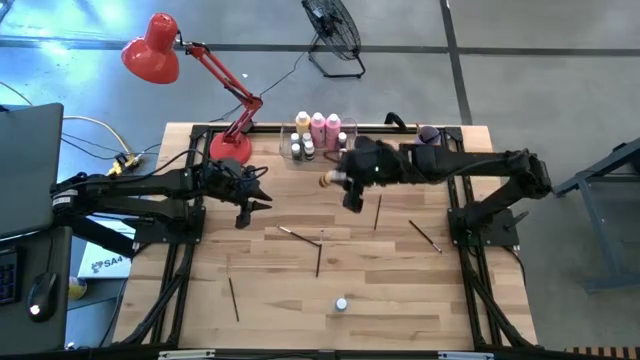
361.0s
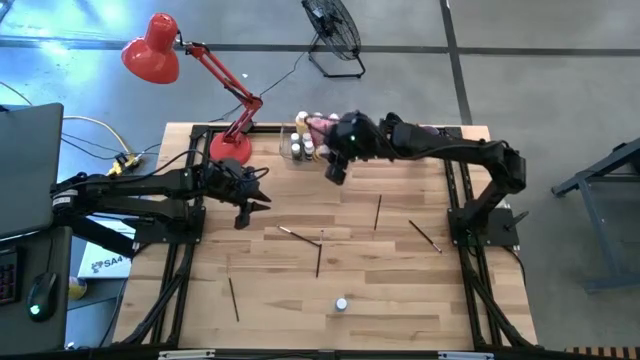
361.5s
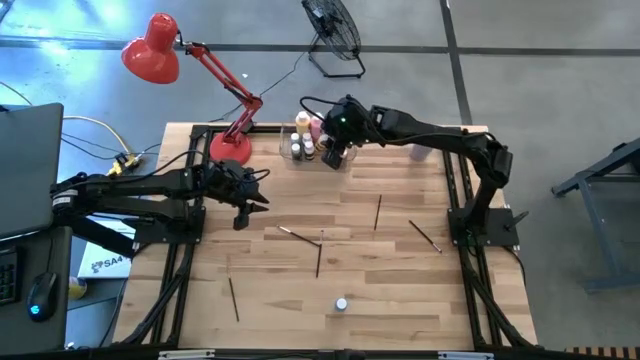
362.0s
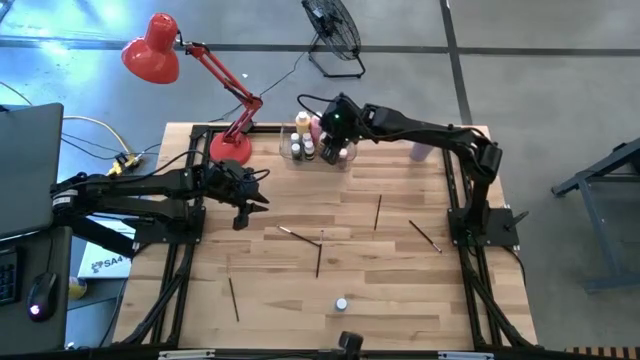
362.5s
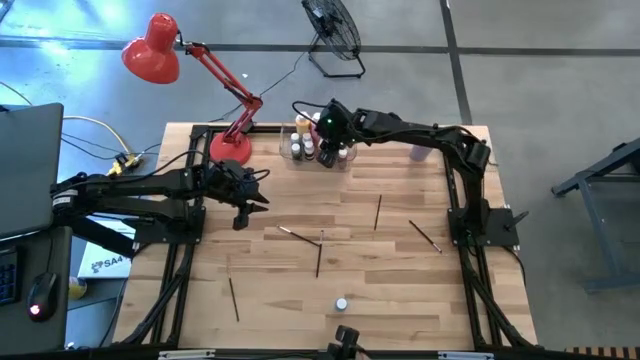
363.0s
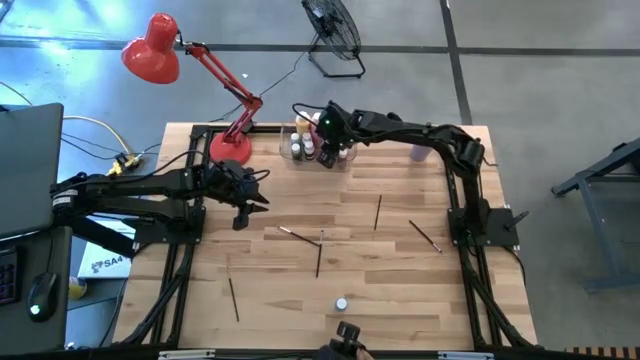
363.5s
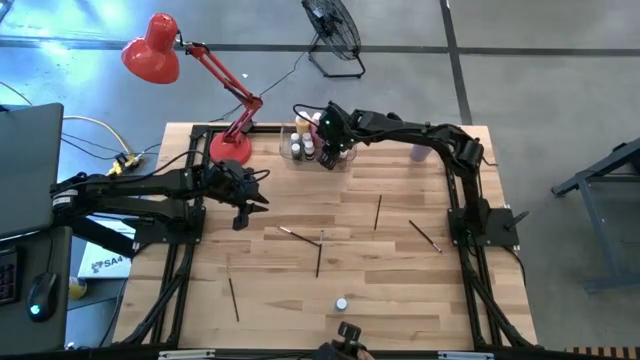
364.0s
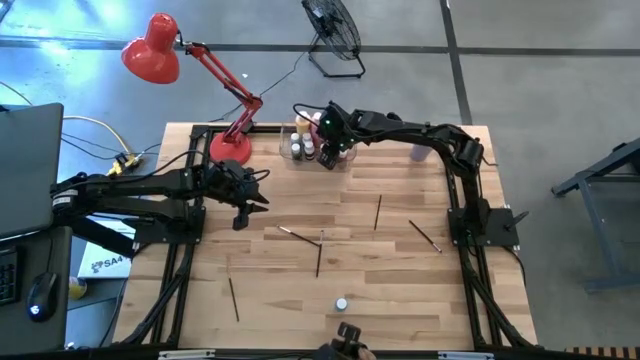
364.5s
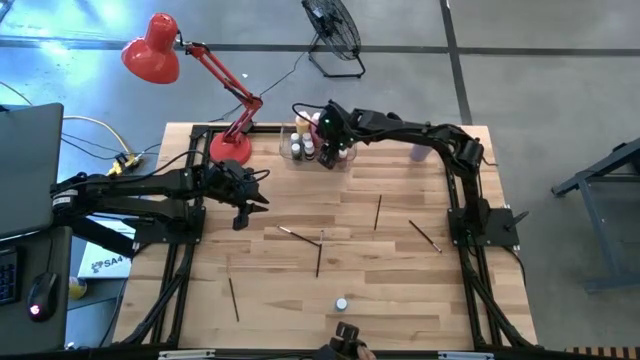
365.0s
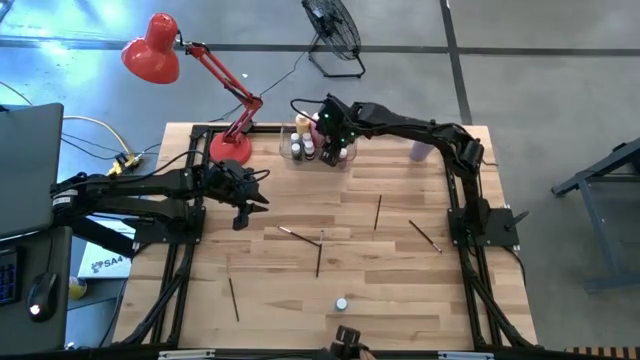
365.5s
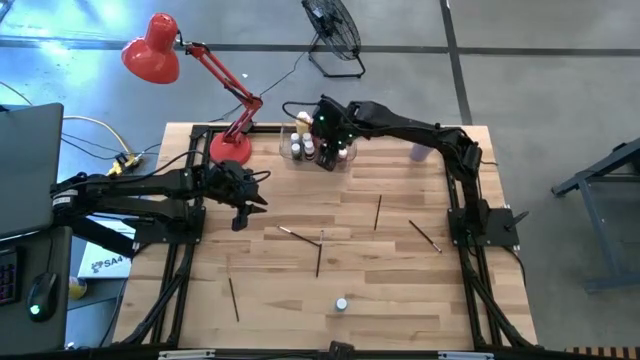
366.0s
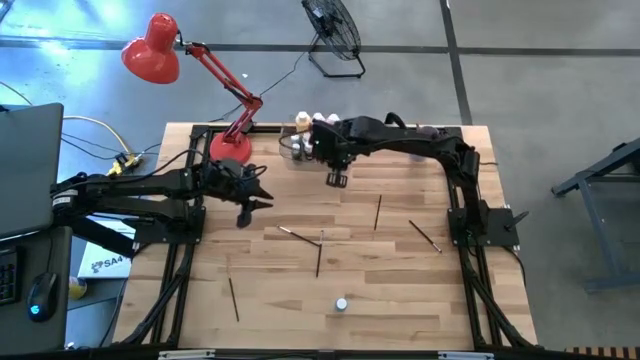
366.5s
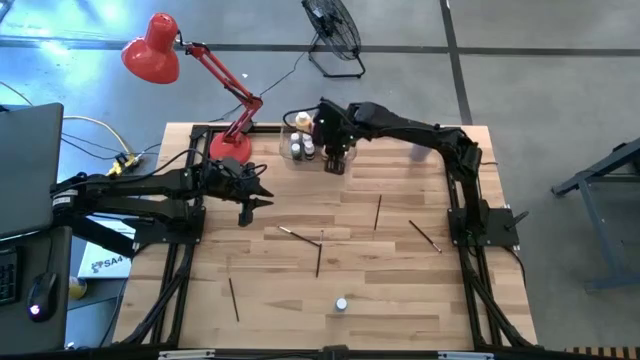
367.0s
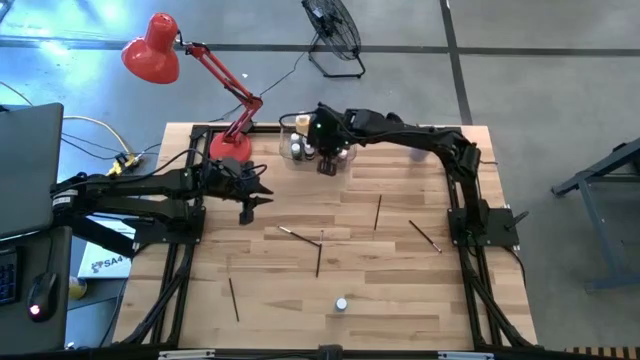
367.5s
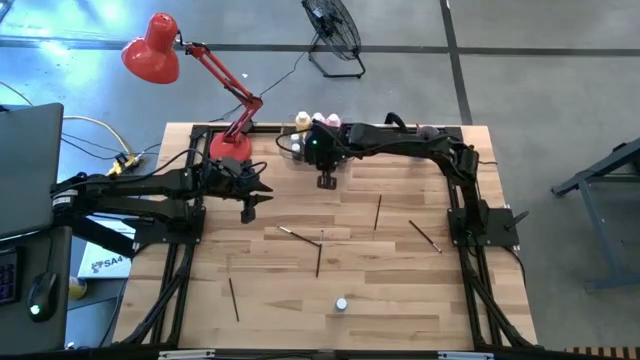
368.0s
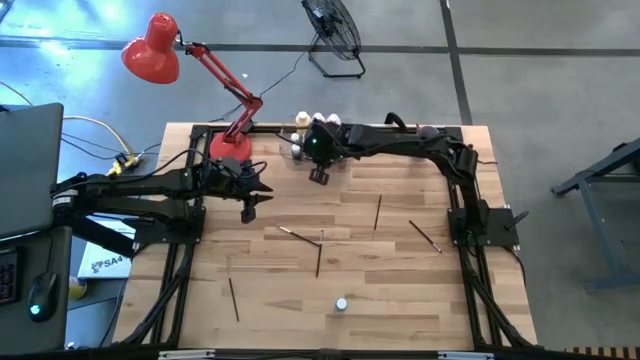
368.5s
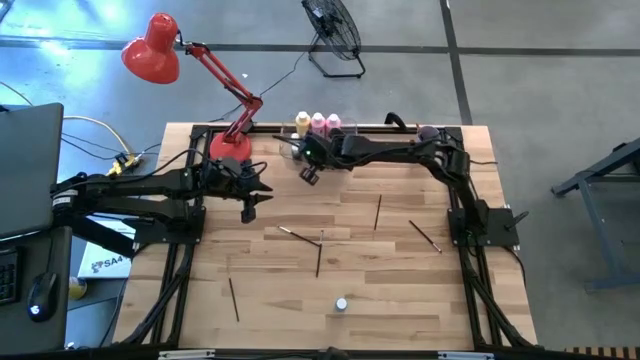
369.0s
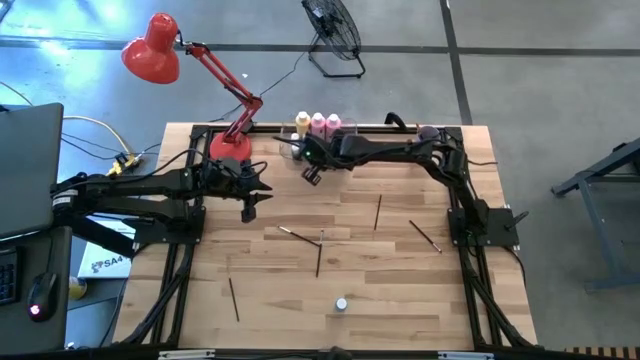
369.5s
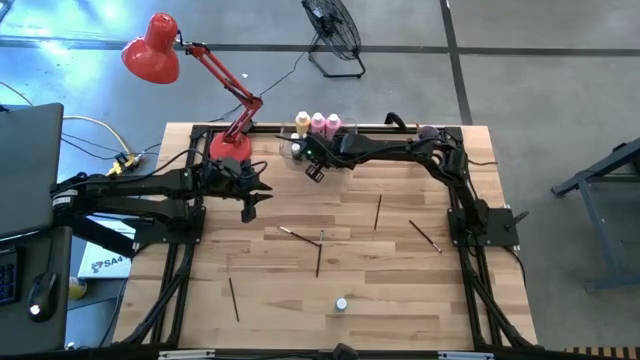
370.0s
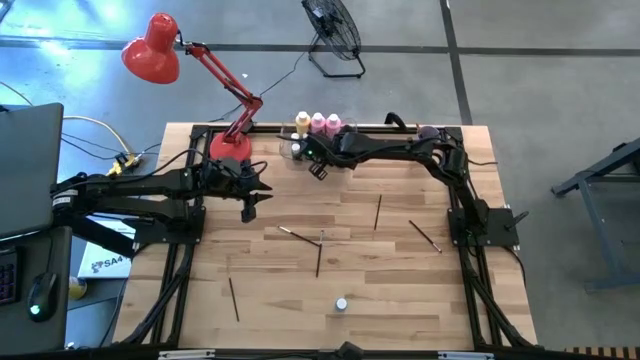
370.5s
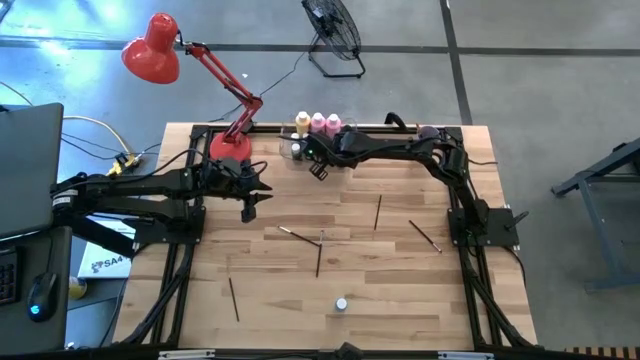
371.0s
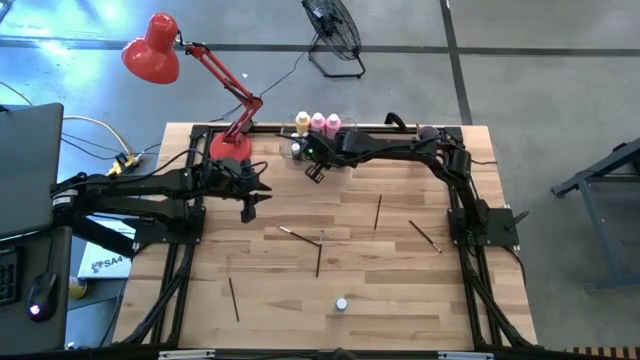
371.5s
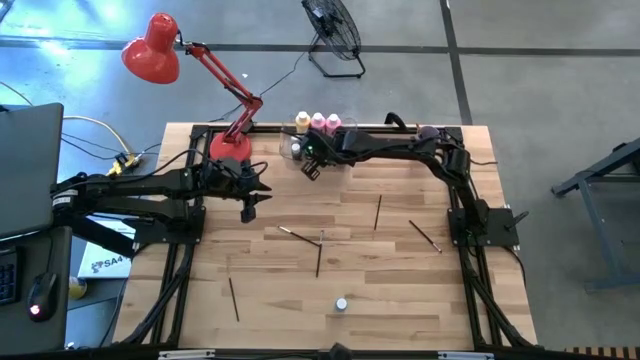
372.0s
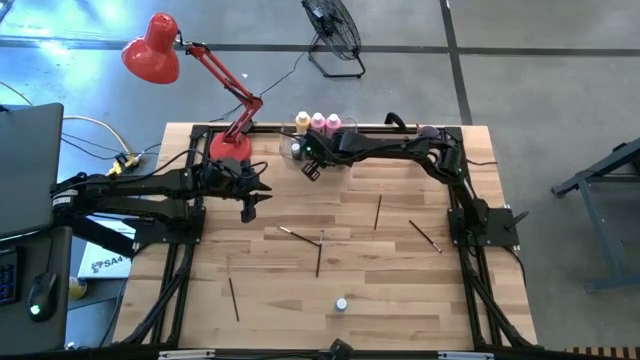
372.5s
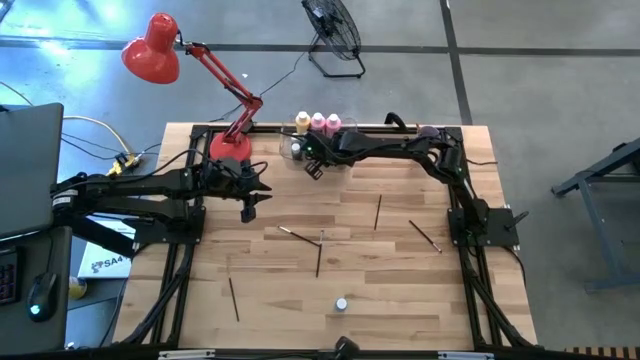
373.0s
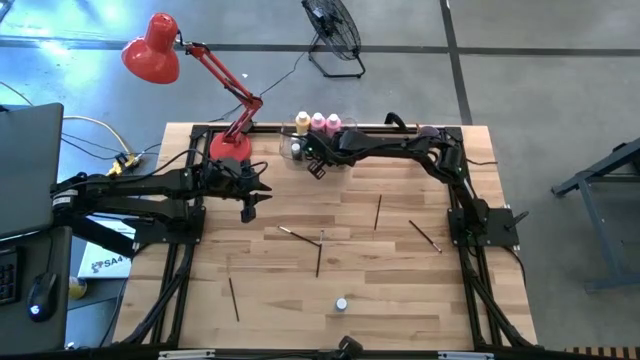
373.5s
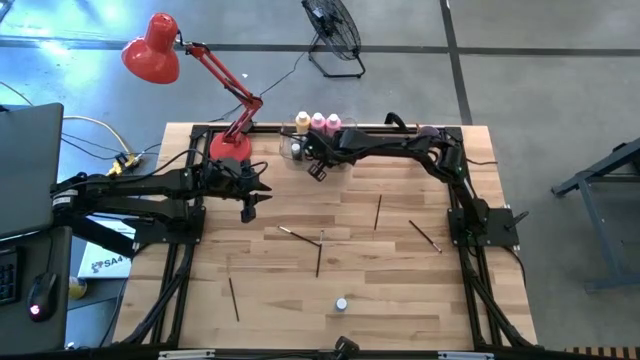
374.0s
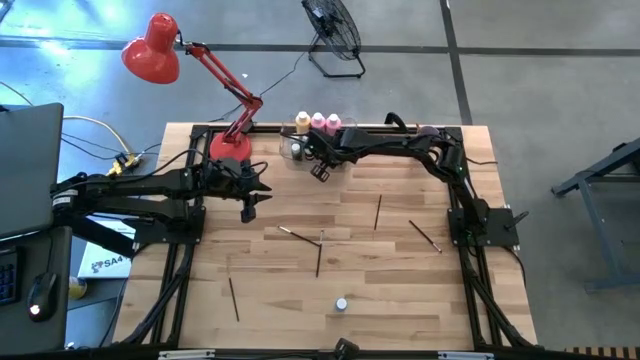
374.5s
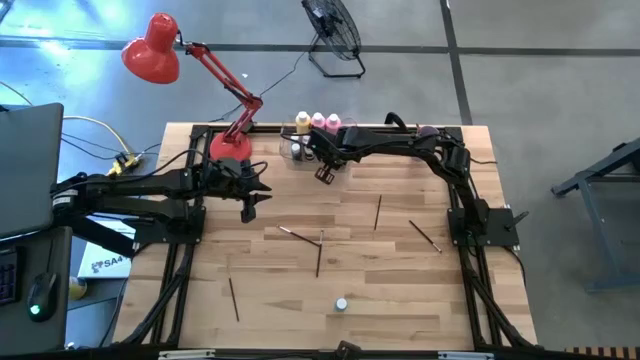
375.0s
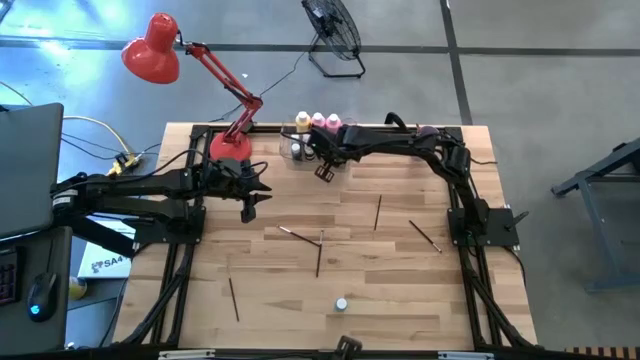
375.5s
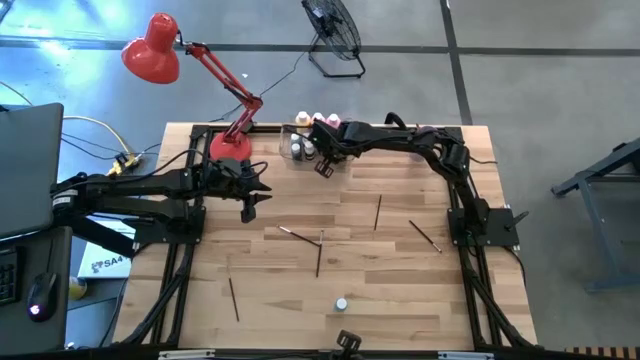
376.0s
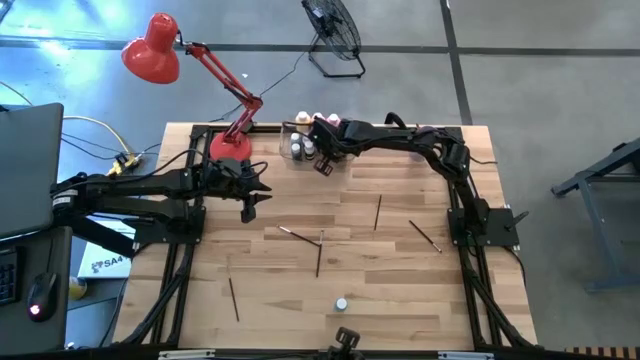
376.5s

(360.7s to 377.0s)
Task: Pick & Place Paint Supplies
Put the small yellow paint bottle into the transparent bin

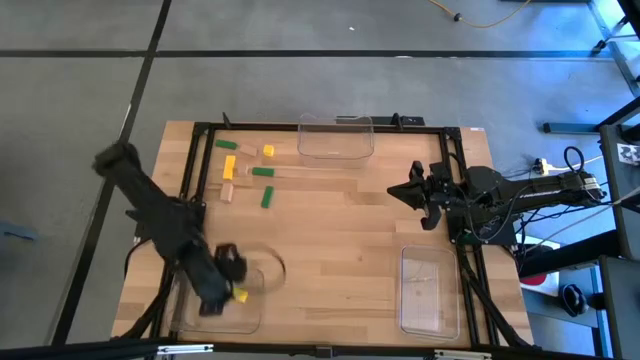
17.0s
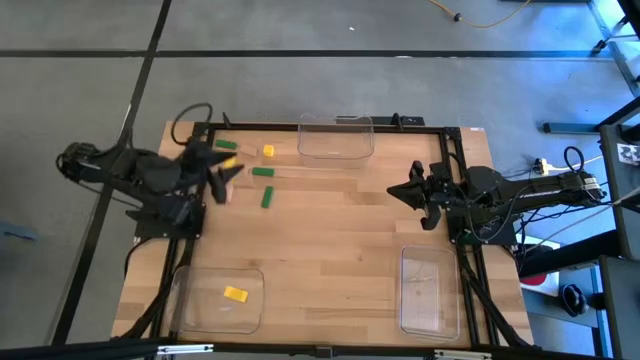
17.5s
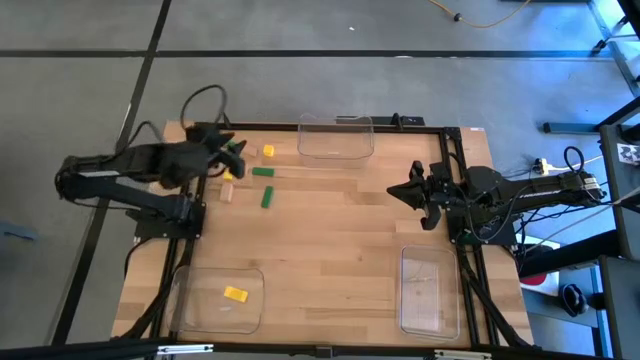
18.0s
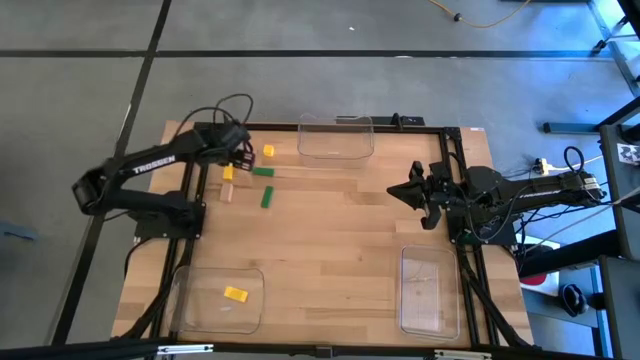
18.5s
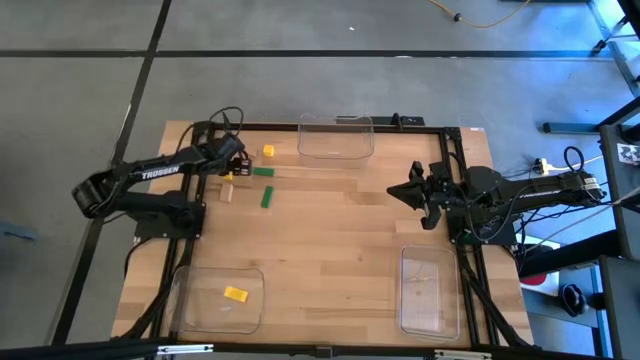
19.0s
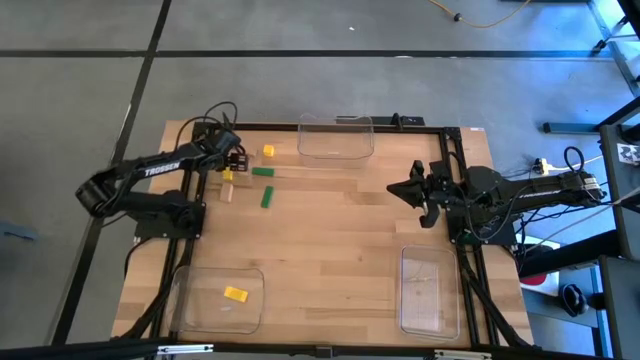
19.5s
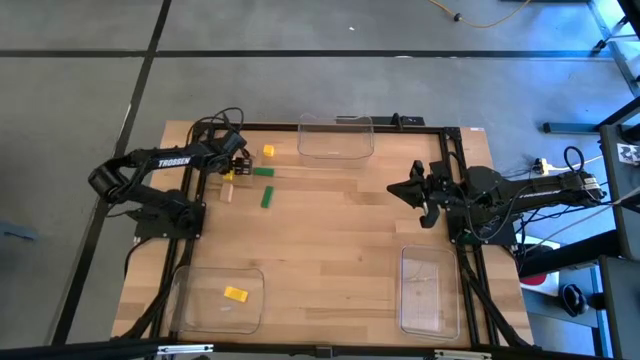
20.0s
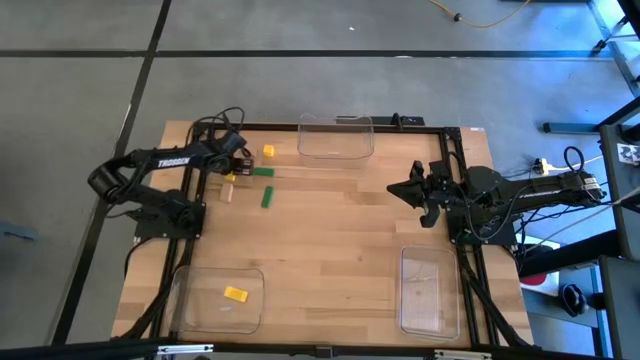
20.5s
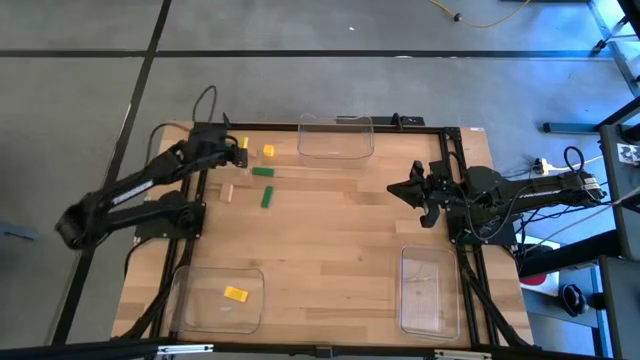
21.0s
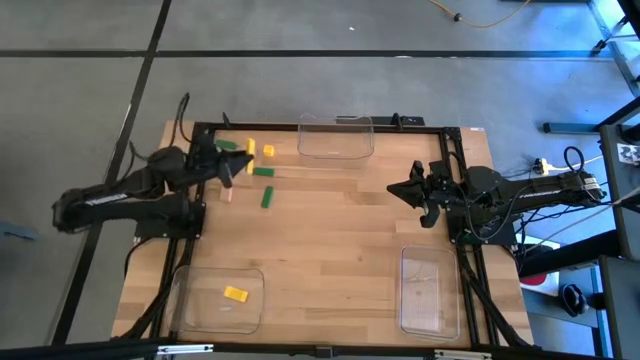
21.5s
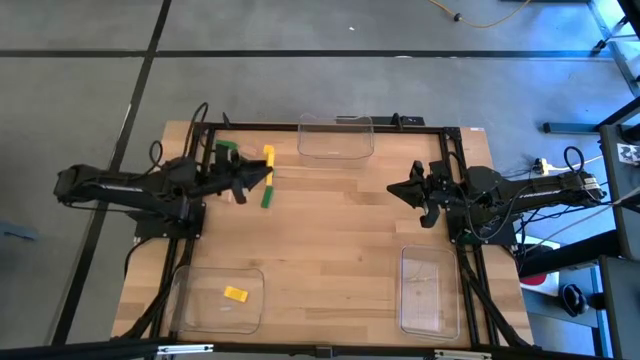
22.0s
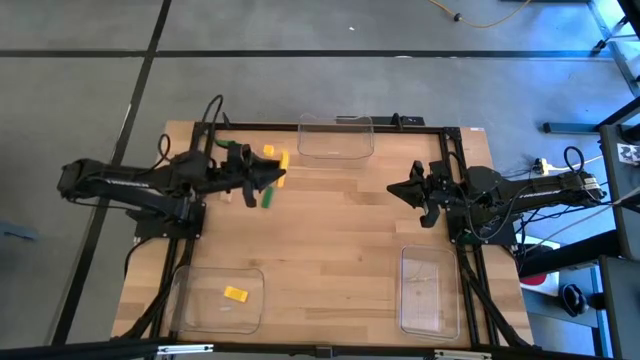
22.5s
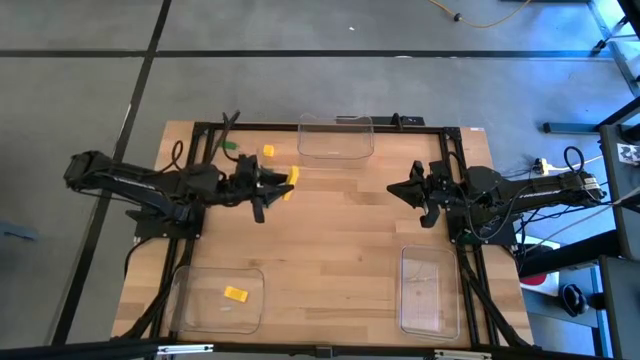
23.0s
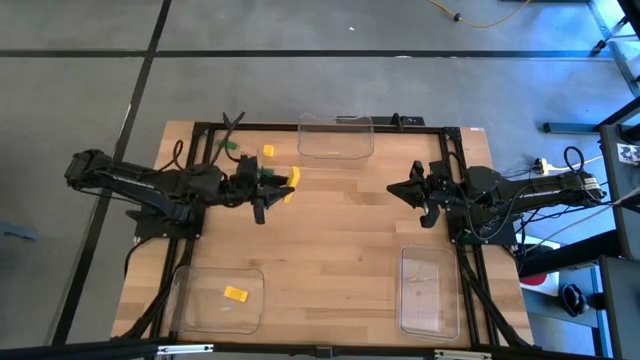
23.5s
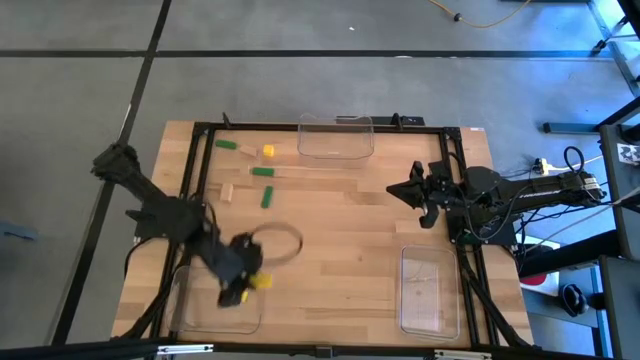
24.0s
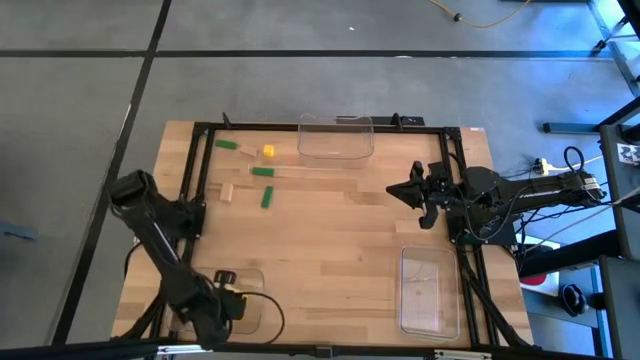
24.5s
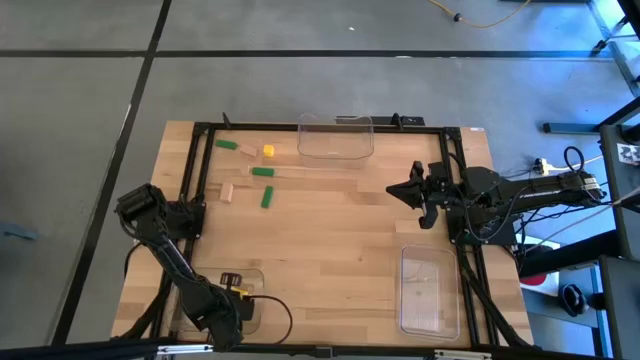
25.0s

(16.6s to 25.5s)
Task: Sort & place blocks by color
Put the left yellow block into the bottom left transparent bin
